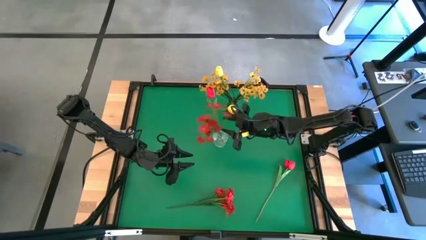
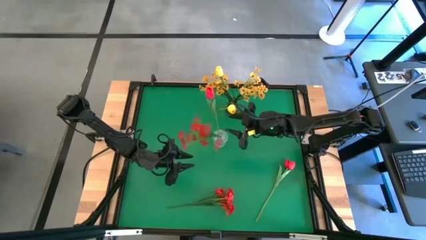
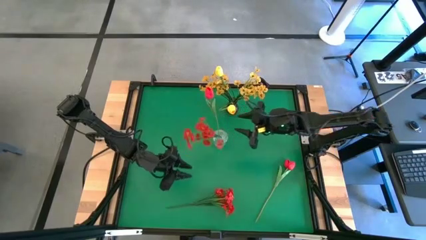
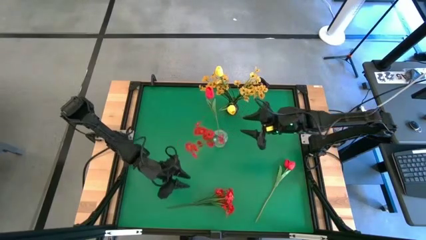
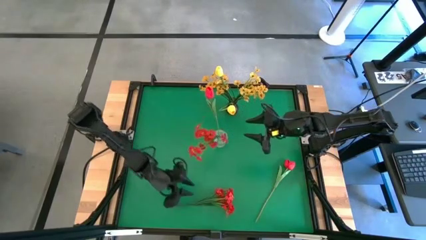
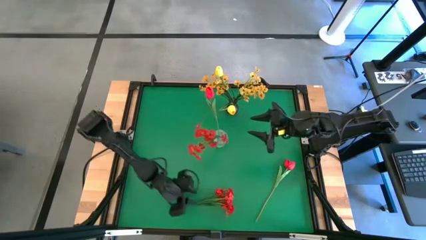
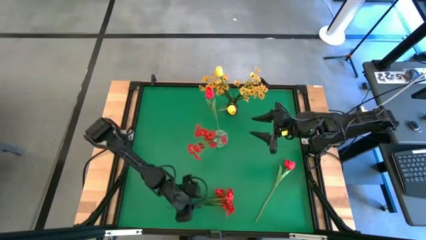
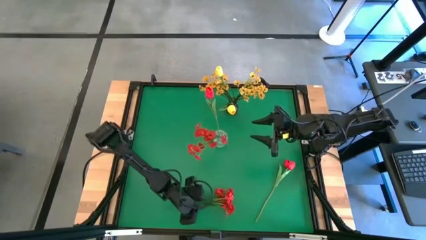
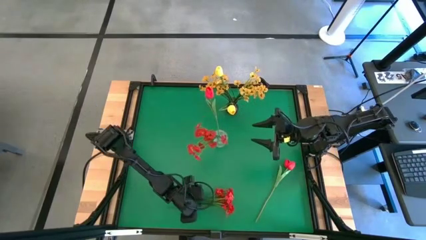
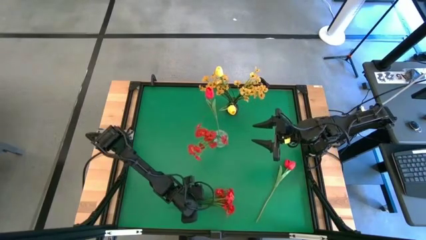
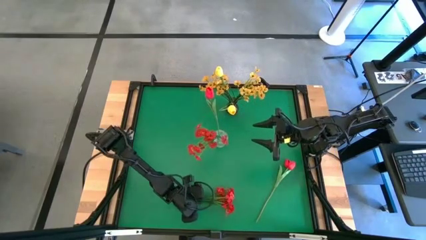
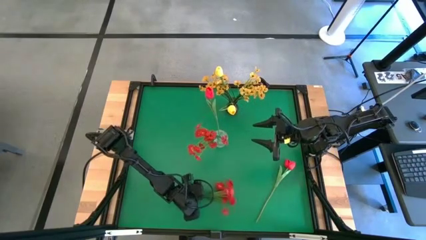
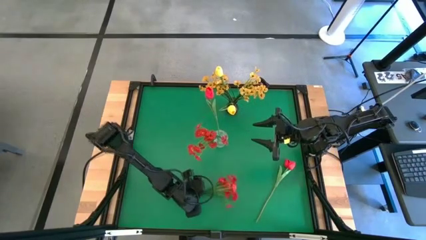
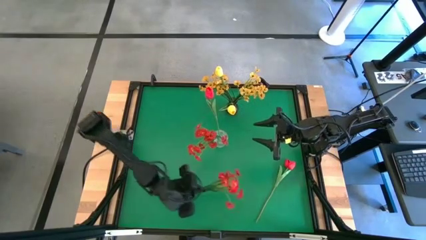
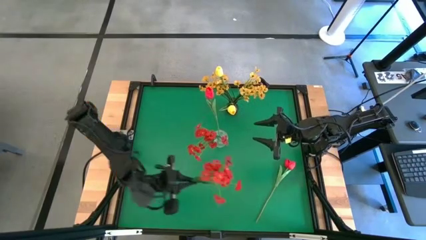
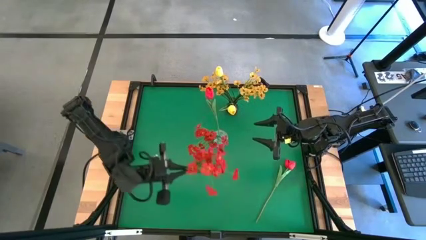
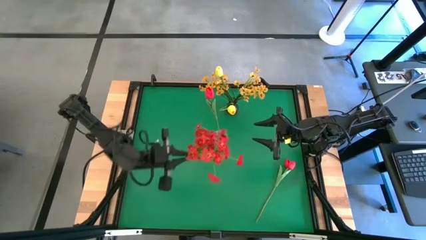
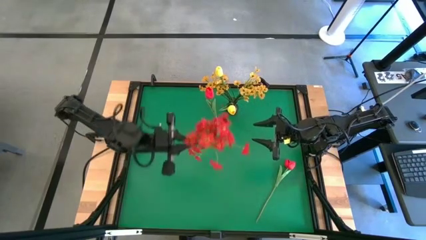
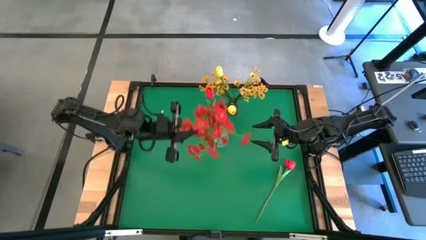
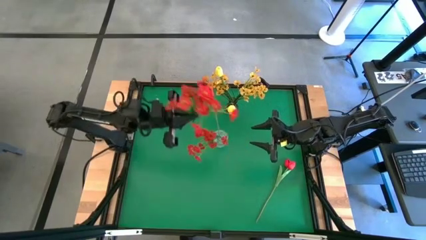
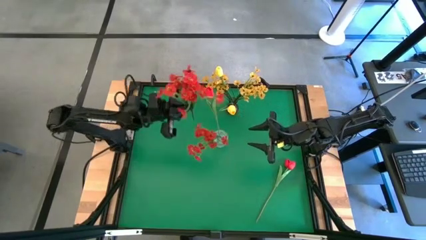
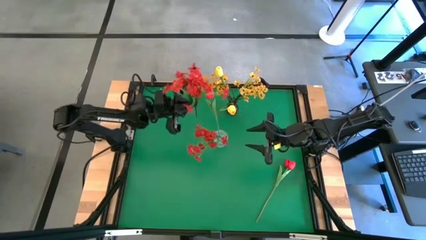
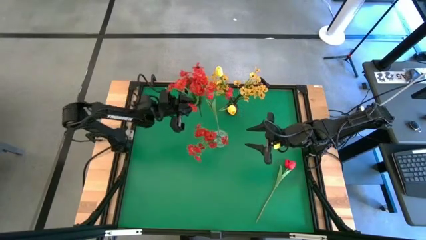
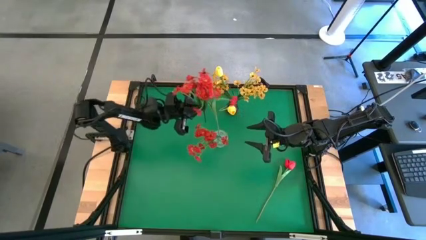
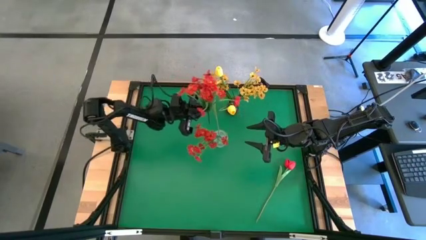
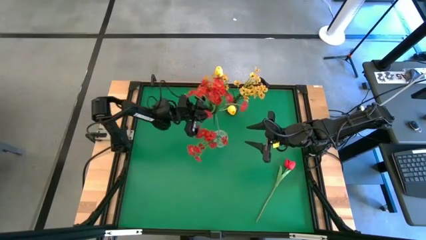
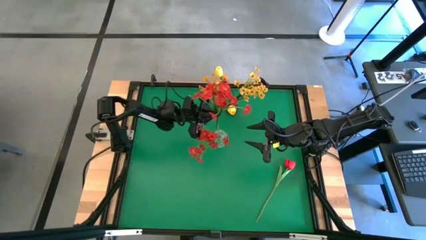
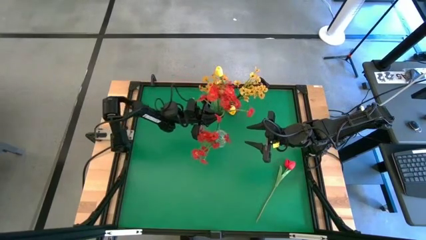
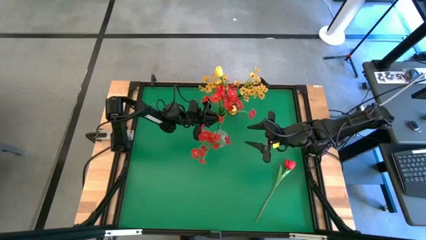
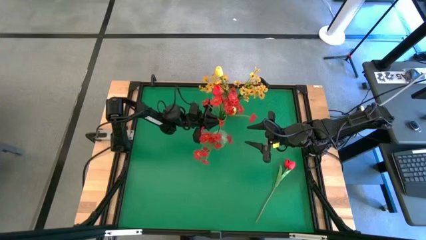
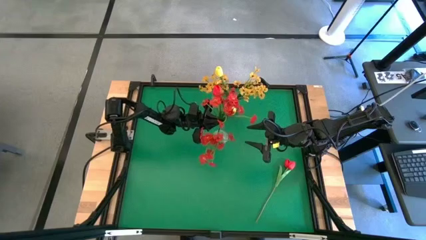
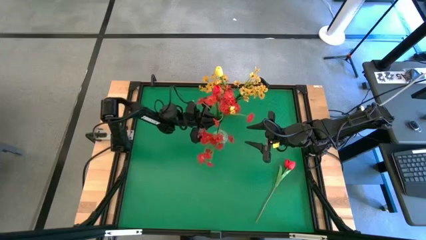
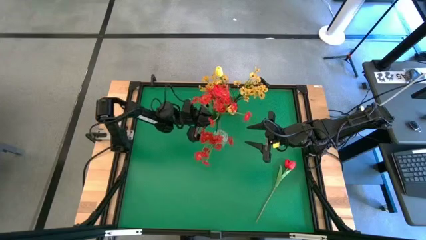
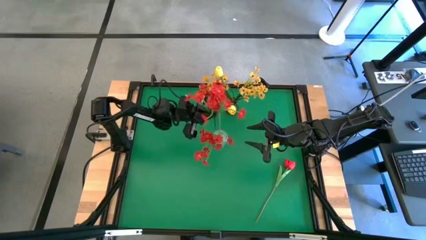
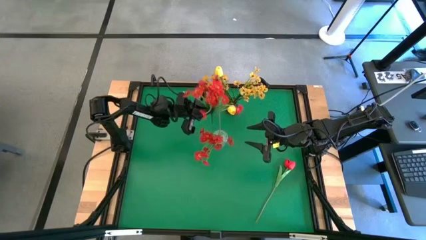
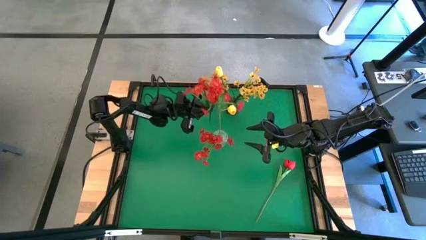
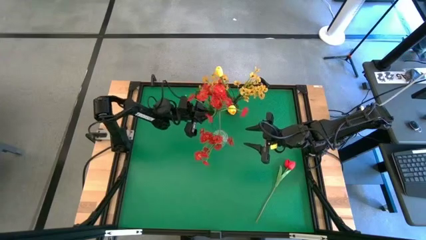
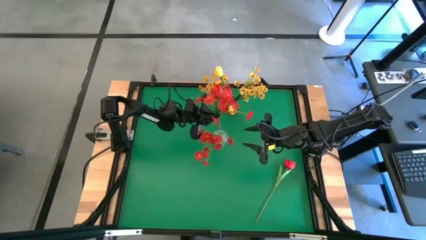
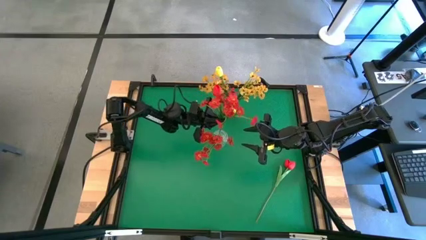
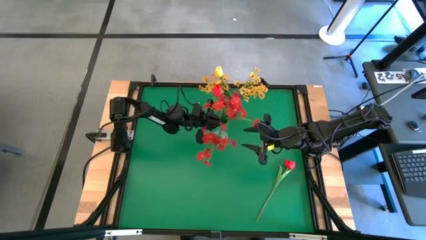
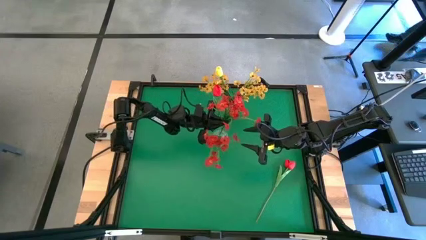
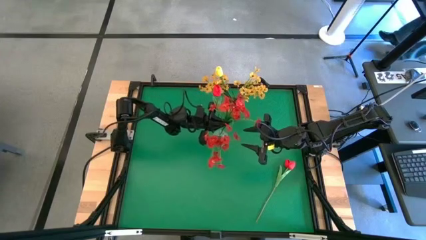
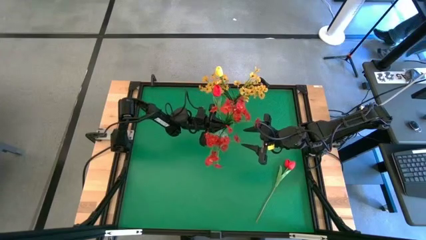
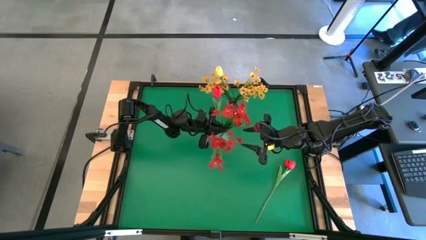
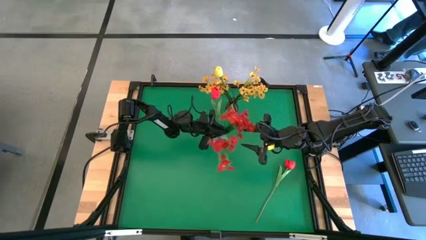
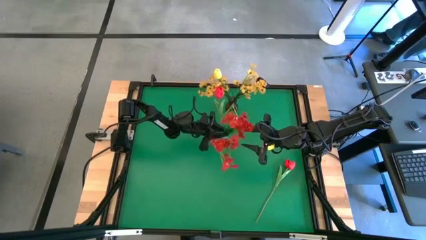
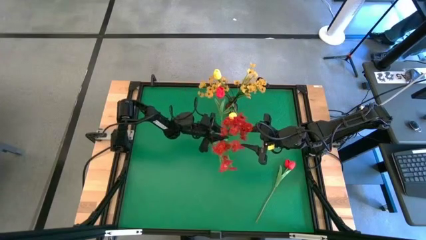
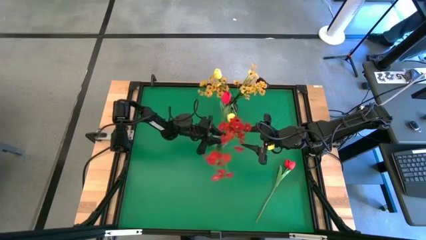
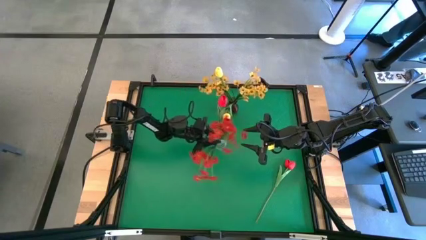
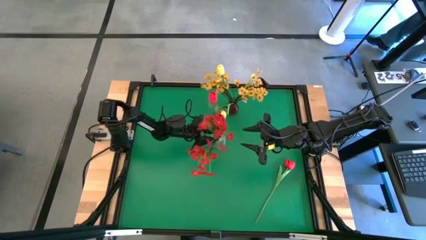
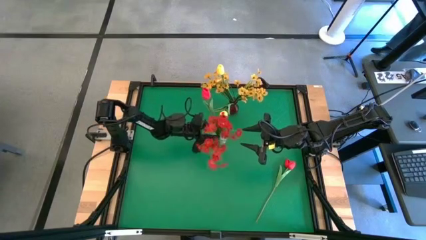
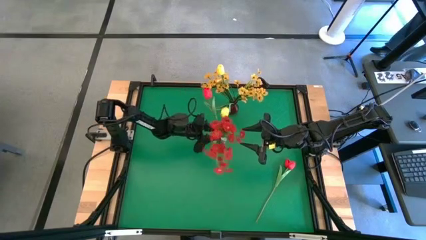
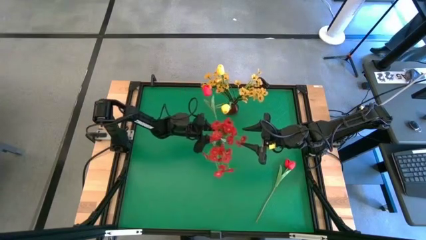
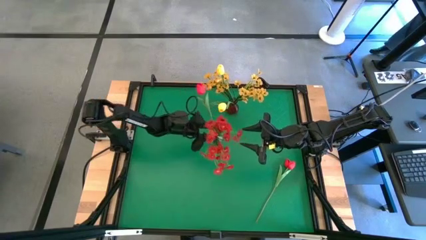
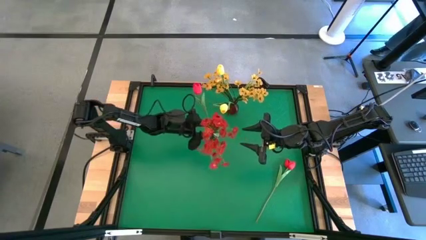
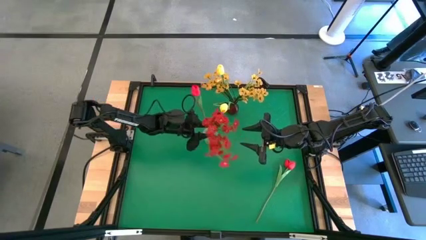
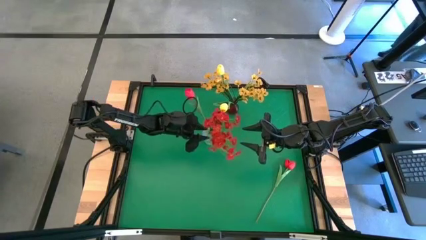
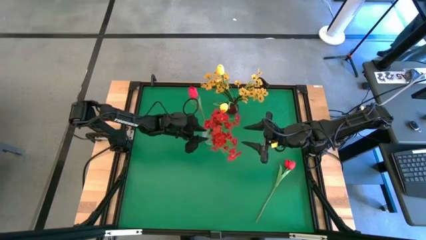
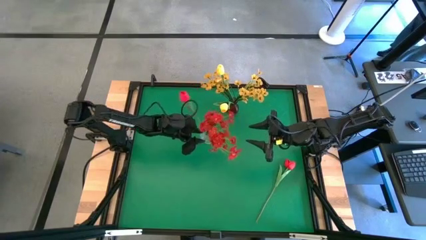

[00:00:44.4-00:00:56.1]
Task: Sort flowers into vase by color
Put the red flowers into the transparent vase
